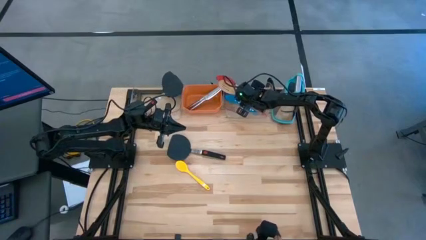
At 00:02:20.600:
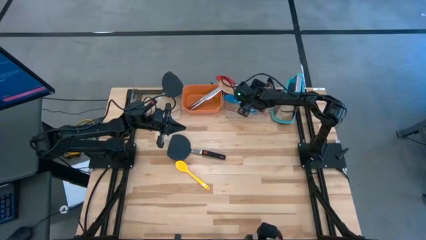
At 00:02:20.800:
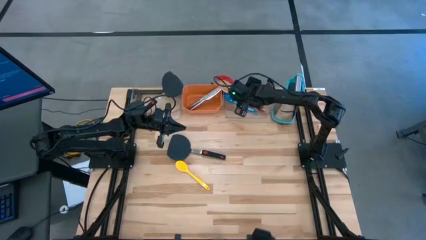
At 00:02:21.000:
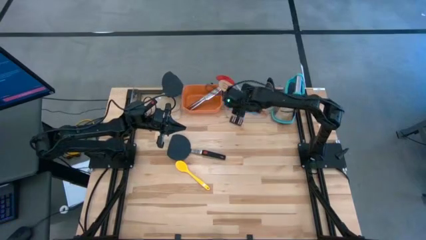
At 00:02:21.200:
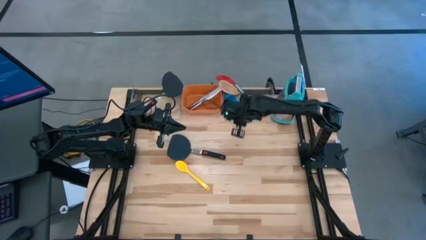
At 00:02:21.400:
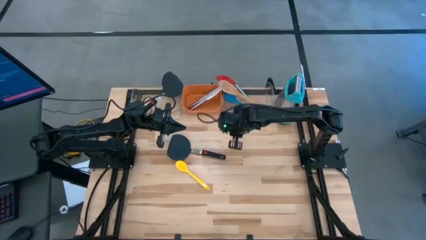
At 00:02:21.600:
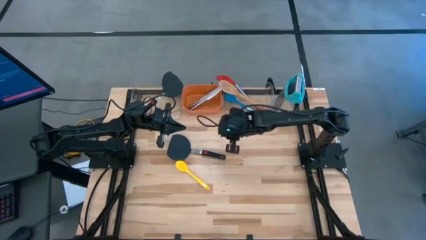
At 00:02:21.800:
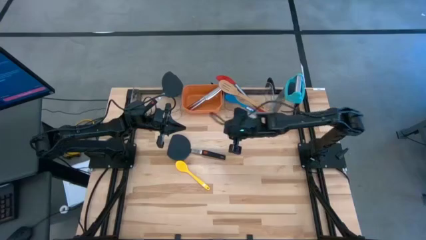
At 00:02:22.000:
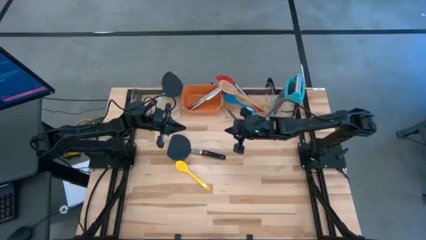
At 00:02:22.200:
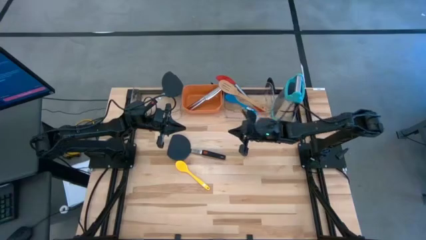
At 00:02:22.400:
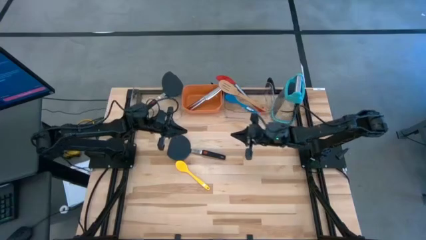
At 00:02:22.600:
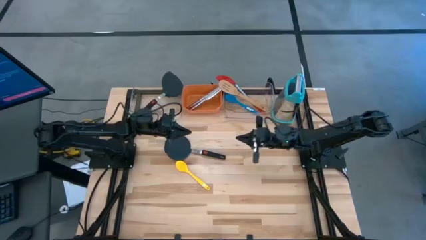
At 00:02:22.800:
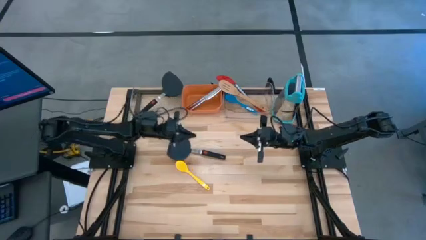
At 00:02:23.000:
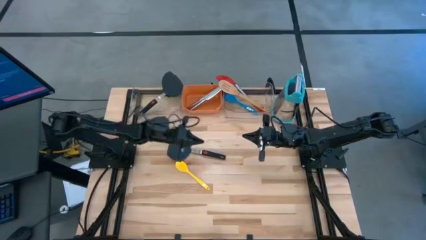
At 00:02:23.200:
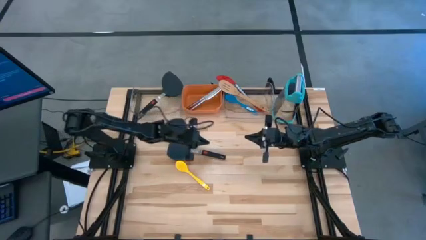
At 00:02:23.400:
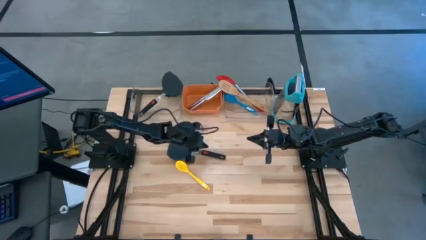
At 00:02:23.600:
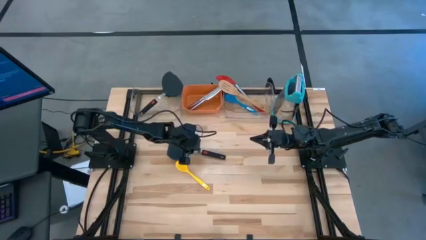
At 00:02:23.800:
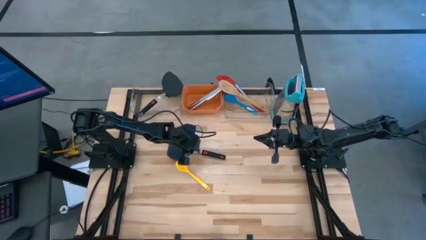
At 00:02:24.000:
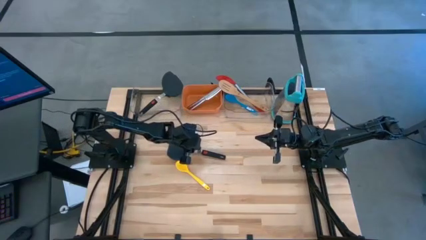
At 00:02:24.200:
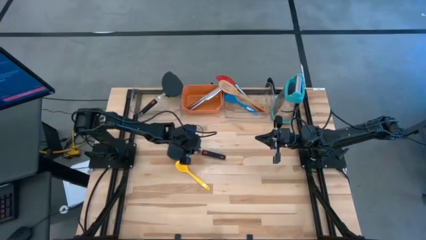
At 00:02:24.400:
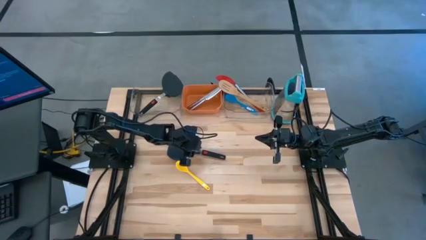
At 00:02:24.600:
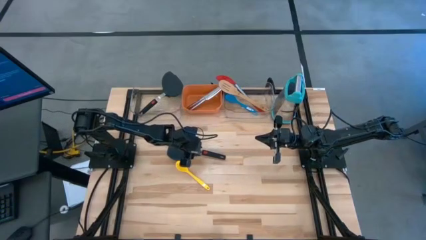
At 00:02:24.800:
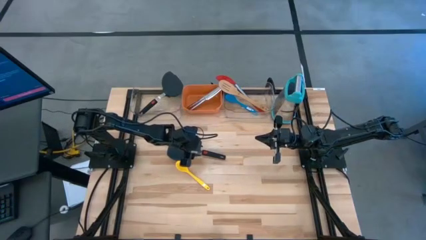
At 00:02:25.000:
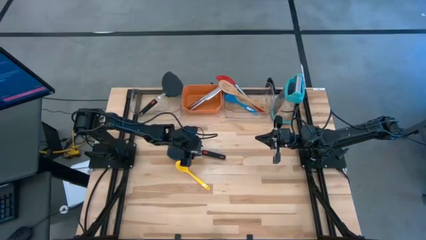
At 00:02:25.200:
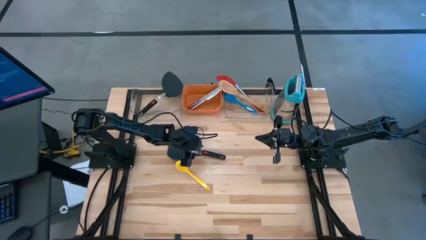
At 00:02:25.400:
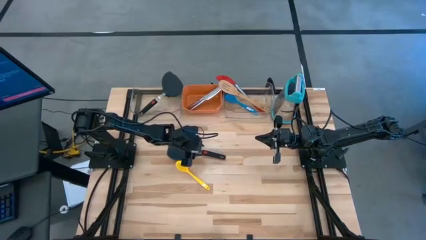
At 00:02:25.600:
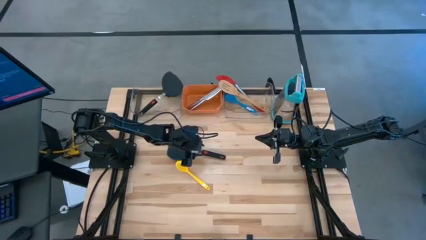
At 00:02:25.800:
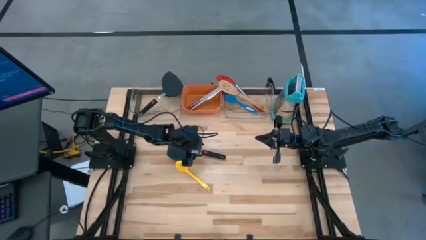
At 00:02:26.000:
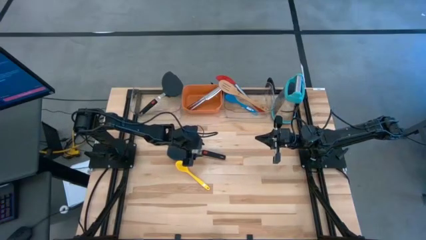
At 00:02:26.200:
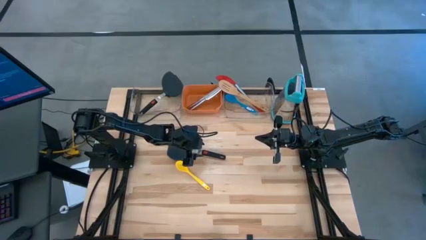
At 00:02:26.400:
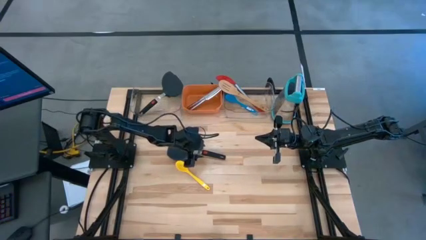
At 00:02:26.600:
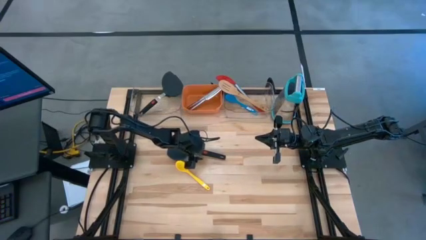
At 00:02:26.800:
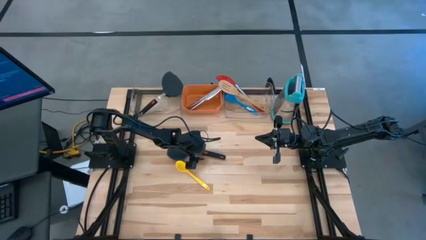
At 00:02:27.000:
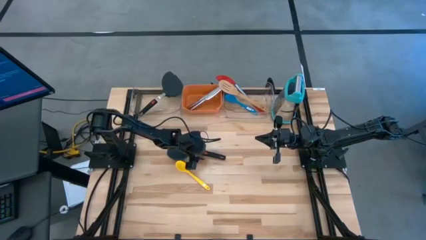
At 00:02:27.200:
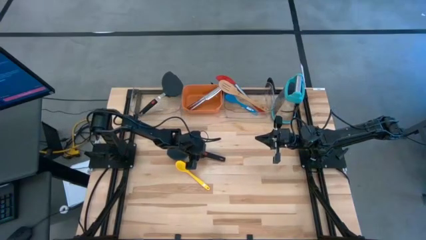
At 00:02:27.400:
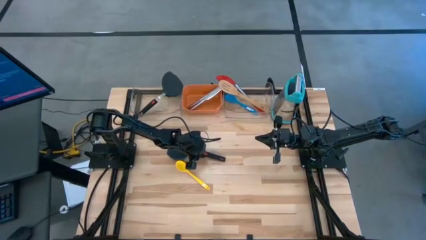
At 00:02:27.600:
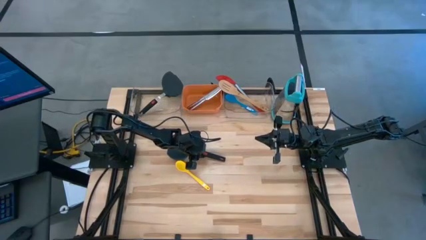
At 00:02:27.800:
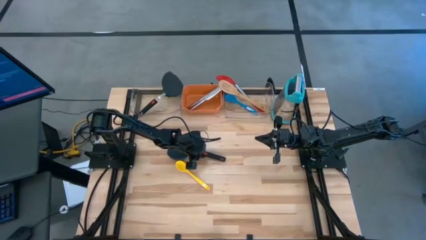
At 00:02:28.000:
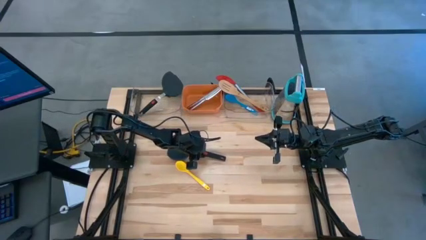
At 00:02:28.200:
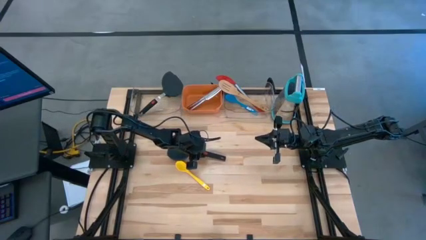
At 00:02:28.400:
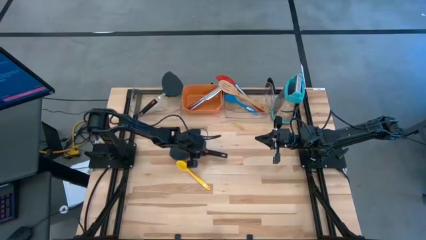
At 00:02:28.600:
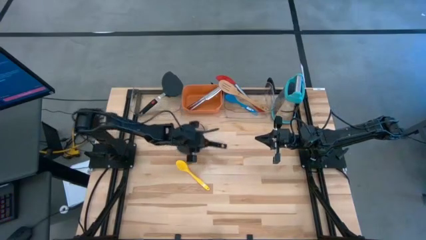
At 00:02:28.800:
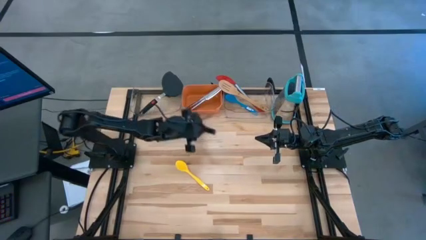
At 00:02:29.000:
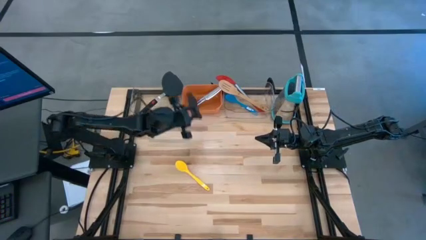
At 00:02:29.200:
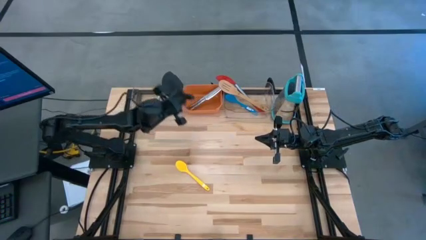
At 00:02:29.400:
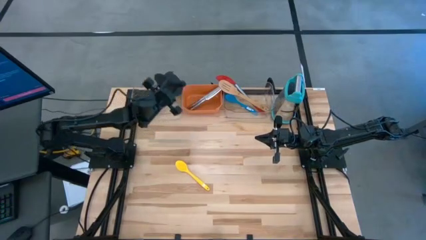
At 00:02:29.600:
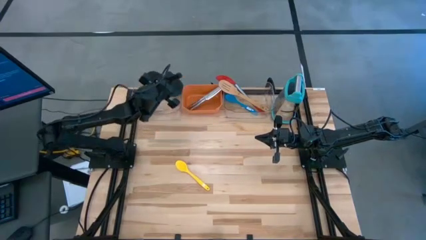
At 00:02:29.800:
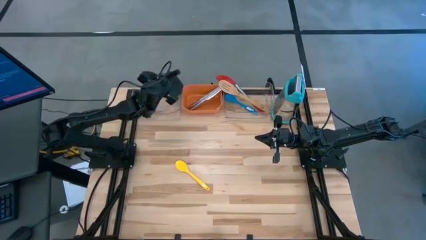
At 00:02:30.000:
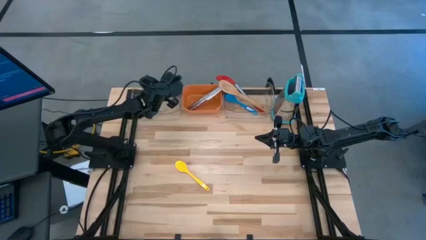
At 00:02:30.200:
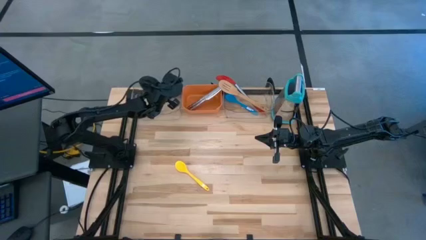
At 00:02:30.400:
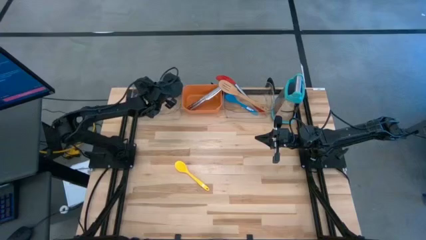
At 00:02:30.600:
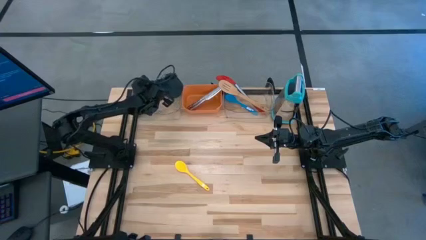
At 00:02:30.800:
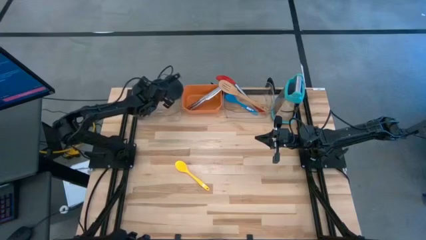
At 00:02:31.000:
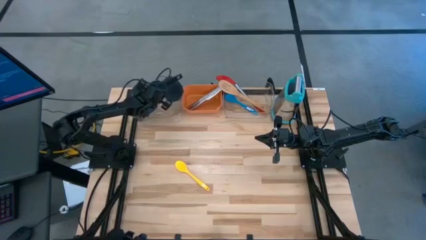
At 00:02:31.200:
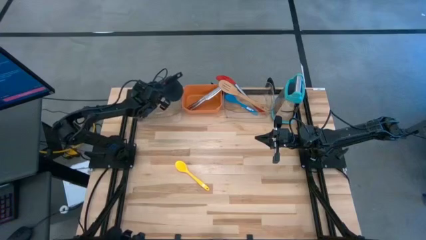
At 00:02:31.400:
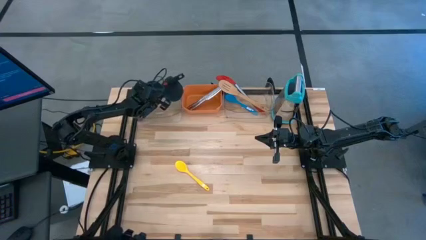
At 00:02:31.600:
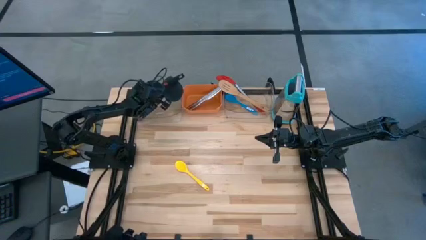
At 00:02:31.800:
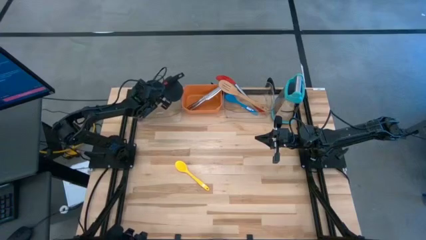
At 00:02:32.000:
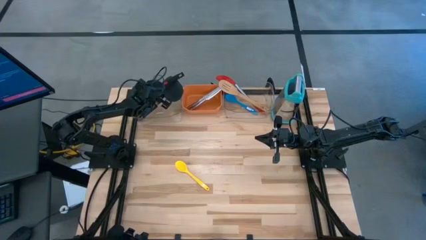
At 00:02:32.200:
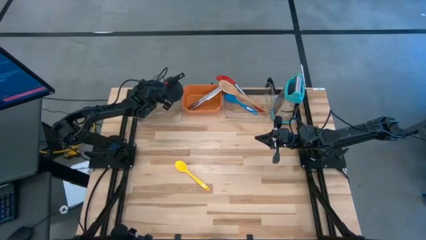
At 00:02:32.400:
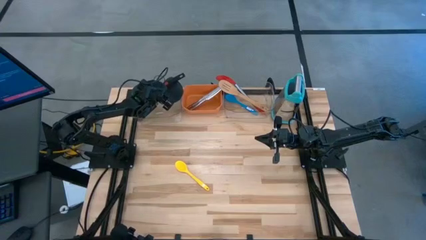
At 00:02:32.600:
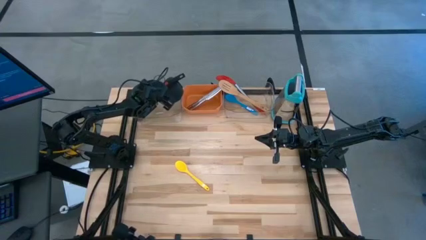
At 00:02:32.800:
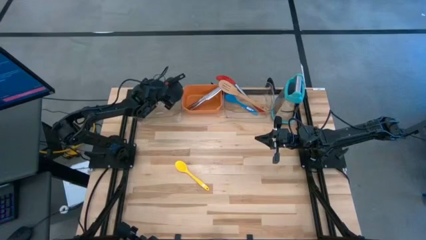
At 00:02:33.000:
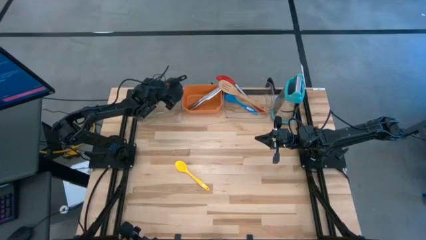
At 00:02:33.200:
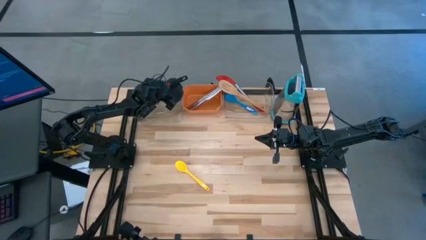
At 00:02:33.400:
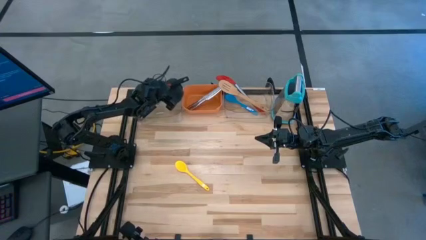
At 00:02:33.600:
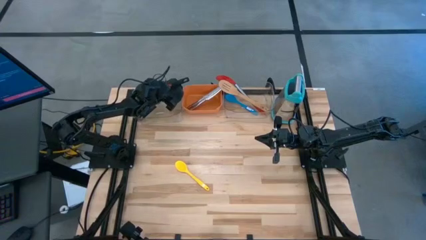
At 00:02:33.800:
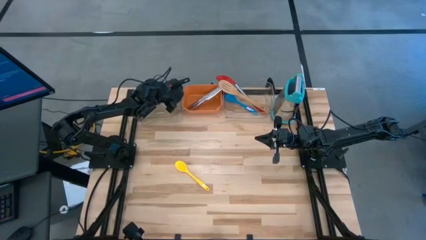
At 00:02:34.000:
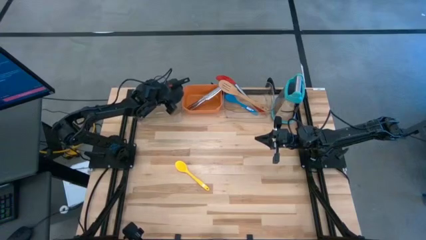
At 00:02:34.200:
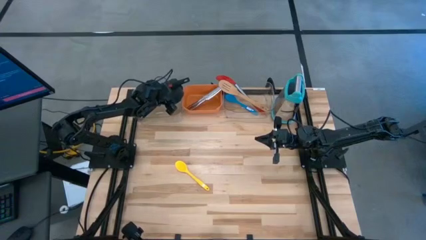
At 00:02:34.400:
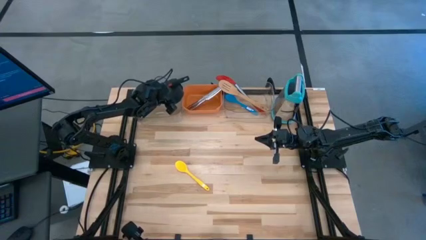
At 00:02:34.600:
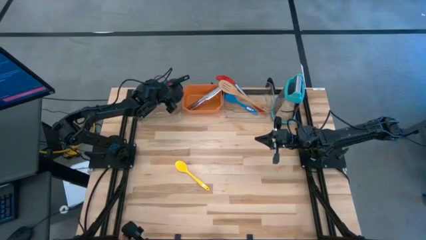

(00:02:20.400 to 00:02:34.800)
Task: Pick & Place Kitchen Items
Put the black spatula into the left transparent bin
